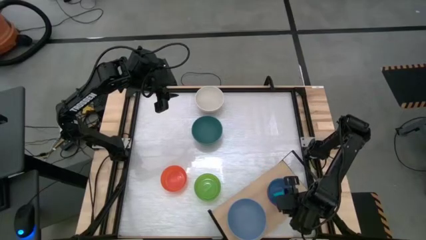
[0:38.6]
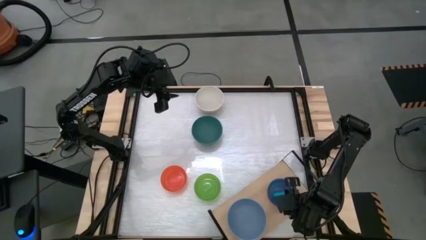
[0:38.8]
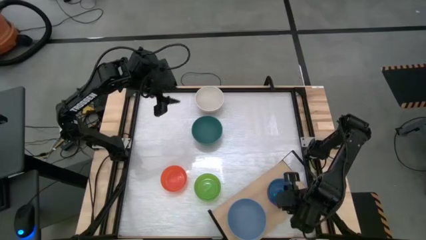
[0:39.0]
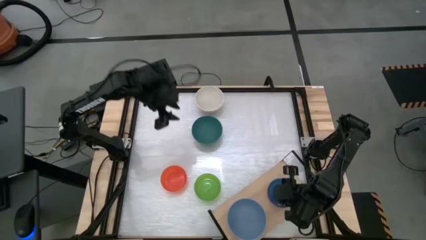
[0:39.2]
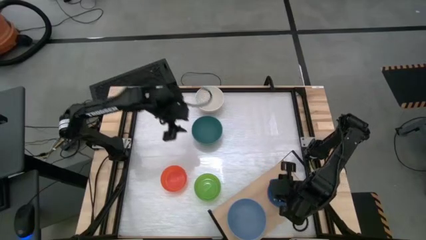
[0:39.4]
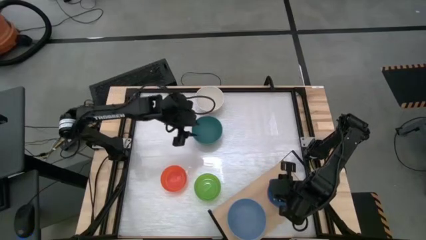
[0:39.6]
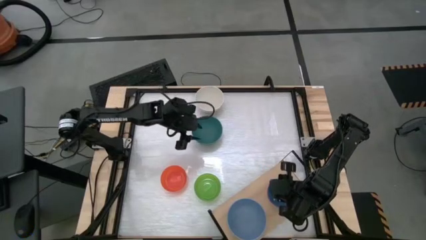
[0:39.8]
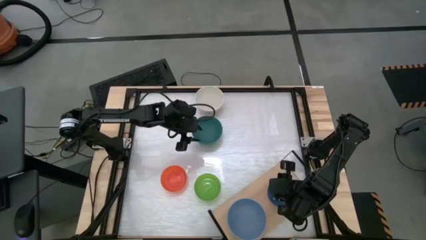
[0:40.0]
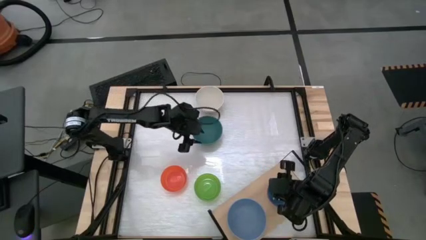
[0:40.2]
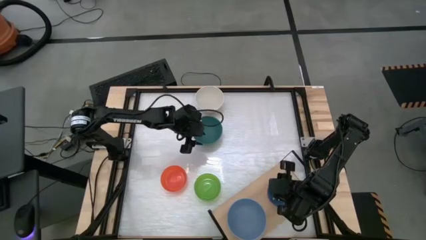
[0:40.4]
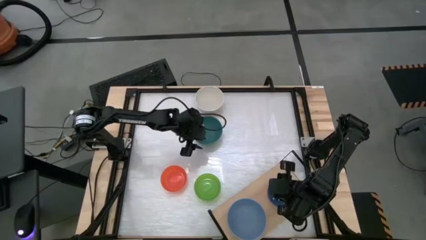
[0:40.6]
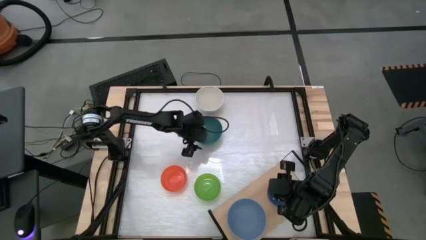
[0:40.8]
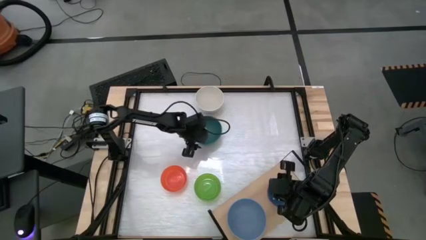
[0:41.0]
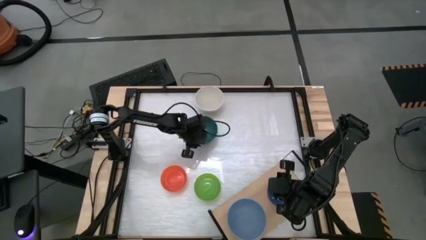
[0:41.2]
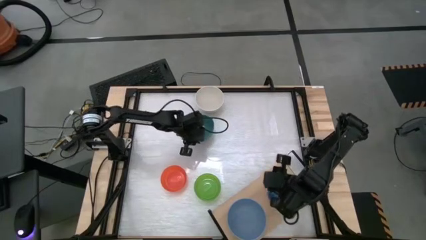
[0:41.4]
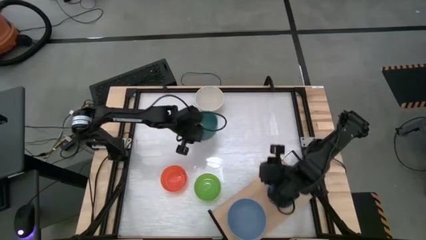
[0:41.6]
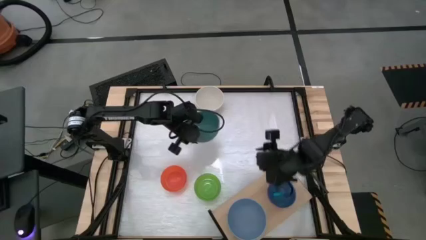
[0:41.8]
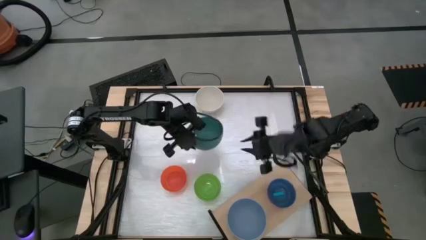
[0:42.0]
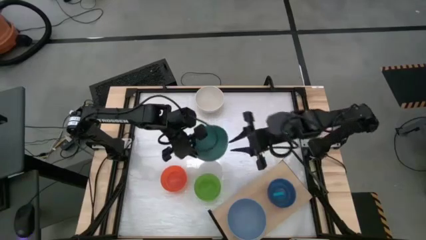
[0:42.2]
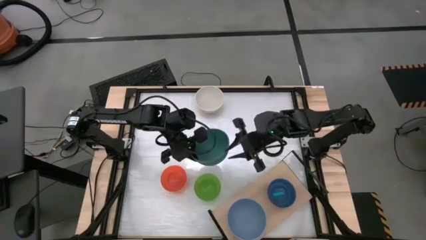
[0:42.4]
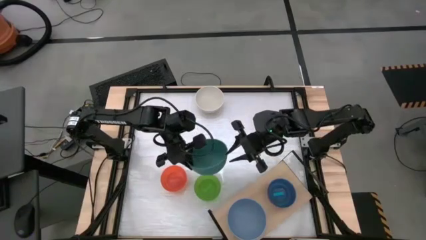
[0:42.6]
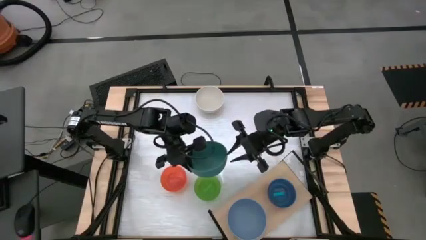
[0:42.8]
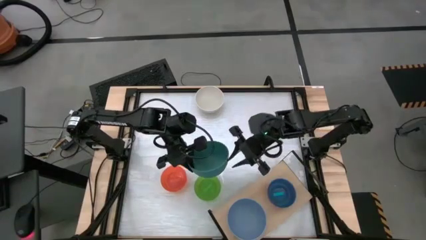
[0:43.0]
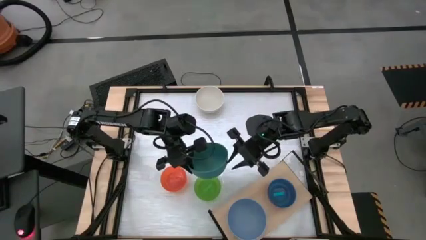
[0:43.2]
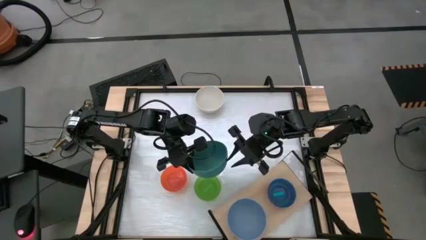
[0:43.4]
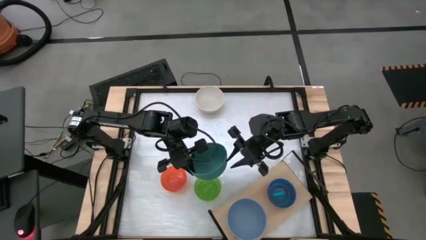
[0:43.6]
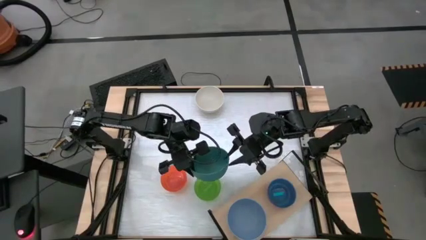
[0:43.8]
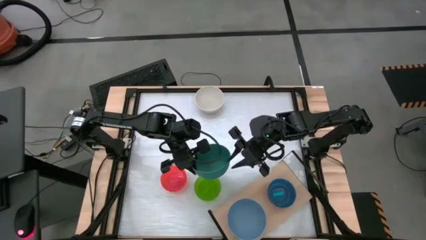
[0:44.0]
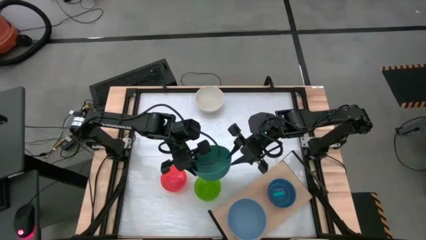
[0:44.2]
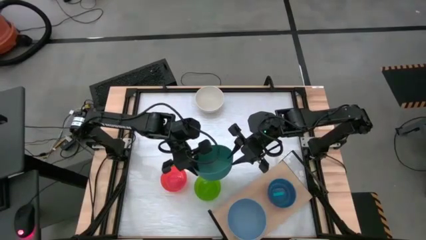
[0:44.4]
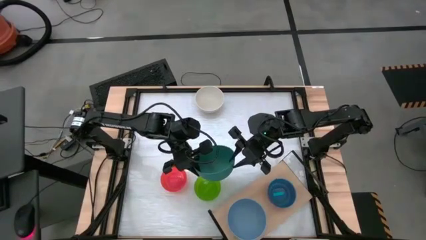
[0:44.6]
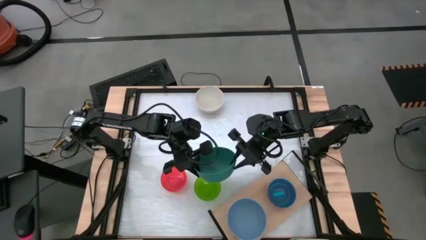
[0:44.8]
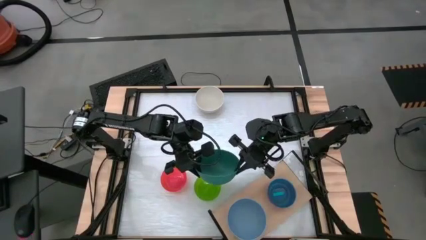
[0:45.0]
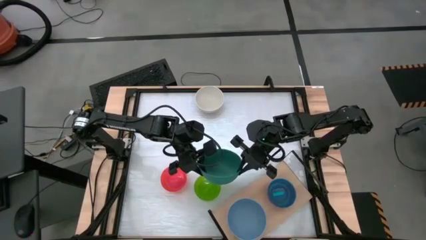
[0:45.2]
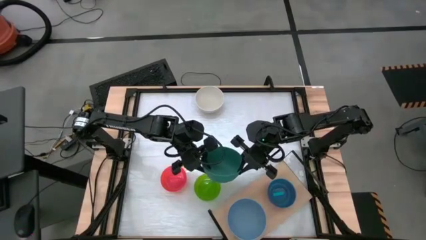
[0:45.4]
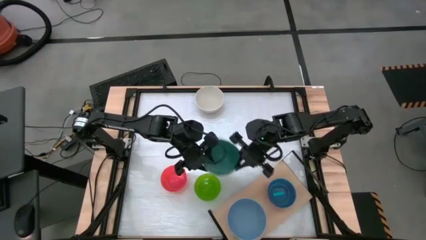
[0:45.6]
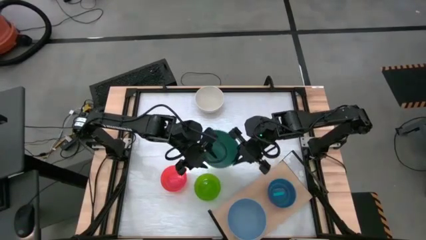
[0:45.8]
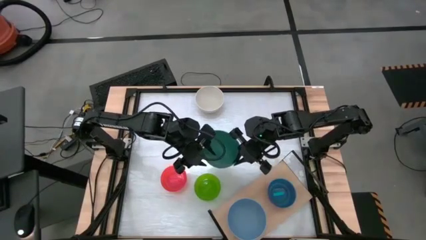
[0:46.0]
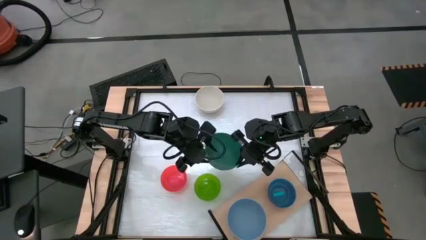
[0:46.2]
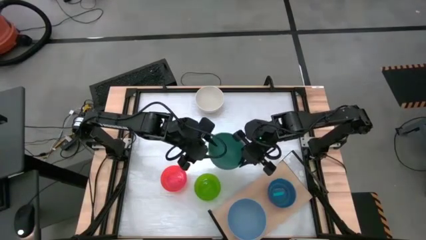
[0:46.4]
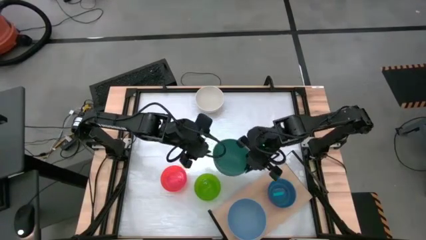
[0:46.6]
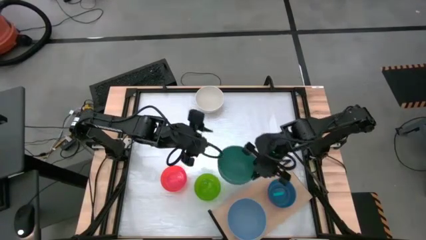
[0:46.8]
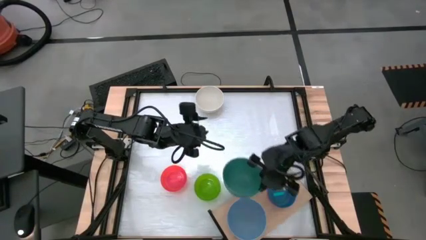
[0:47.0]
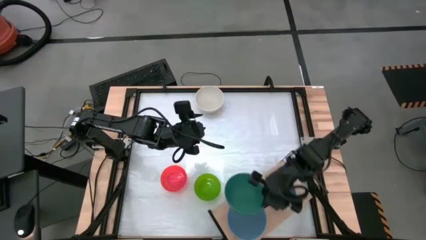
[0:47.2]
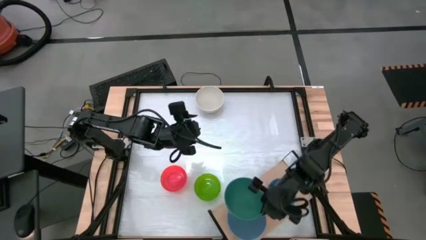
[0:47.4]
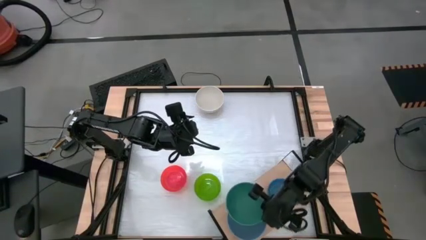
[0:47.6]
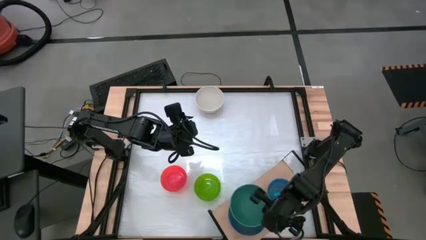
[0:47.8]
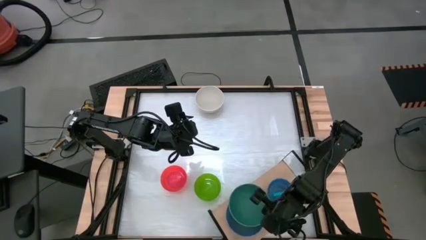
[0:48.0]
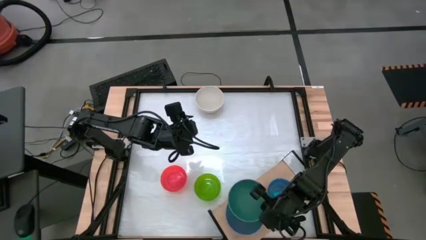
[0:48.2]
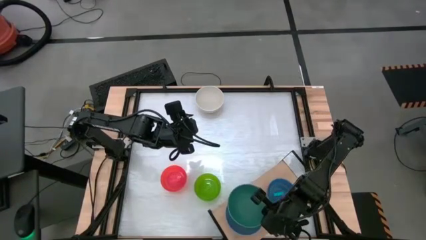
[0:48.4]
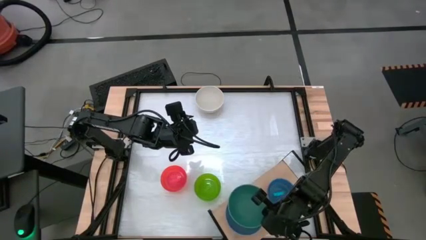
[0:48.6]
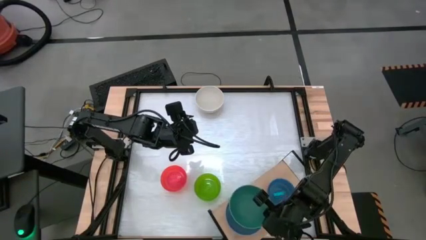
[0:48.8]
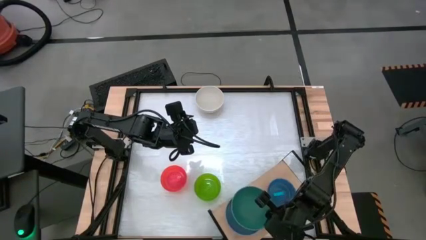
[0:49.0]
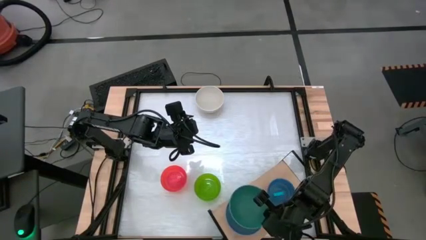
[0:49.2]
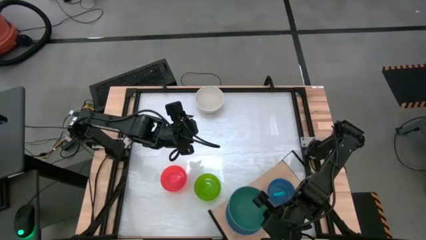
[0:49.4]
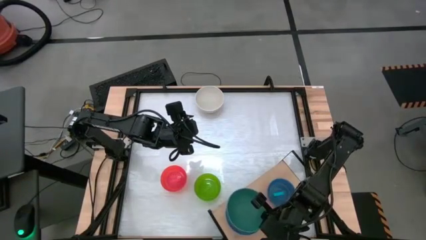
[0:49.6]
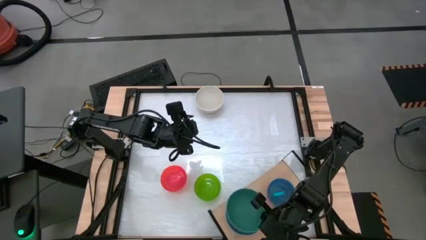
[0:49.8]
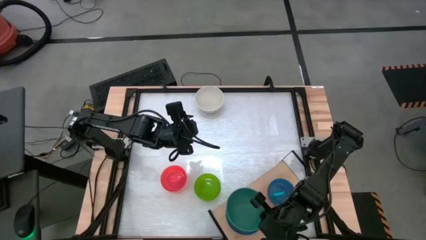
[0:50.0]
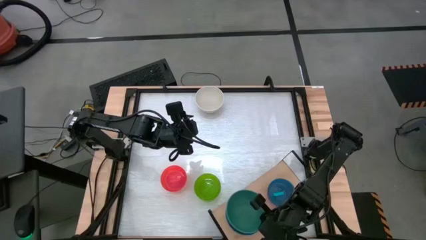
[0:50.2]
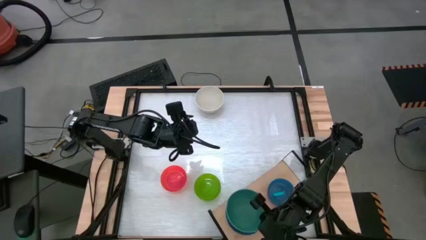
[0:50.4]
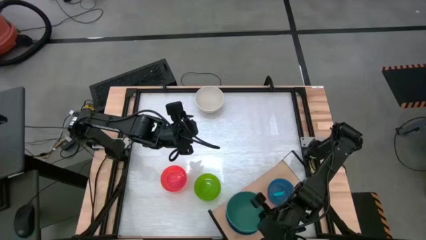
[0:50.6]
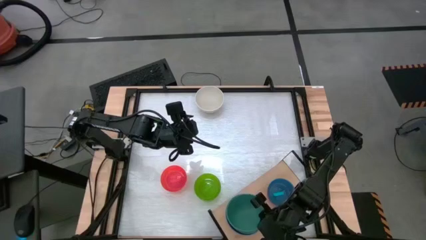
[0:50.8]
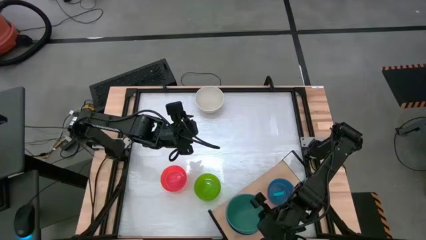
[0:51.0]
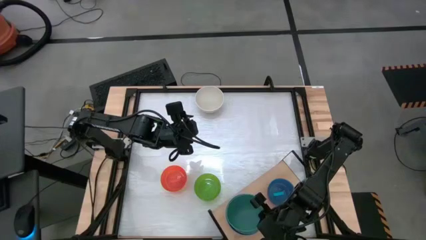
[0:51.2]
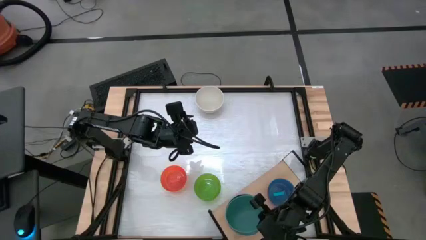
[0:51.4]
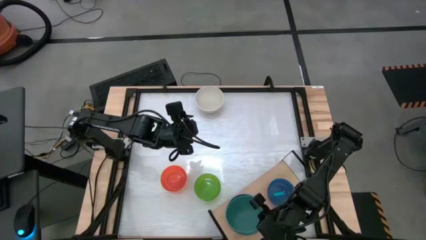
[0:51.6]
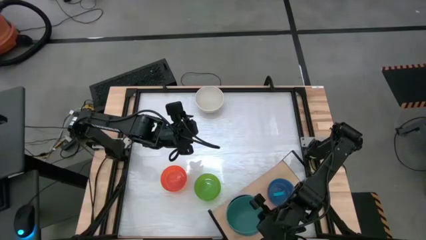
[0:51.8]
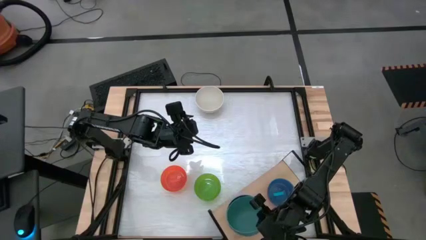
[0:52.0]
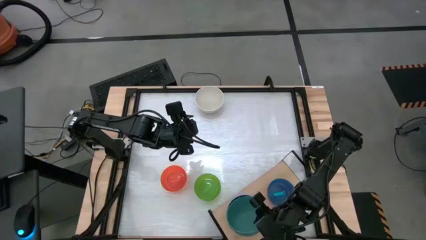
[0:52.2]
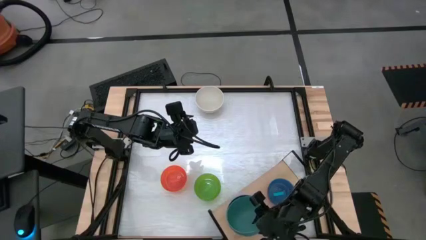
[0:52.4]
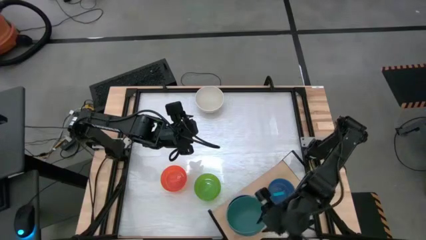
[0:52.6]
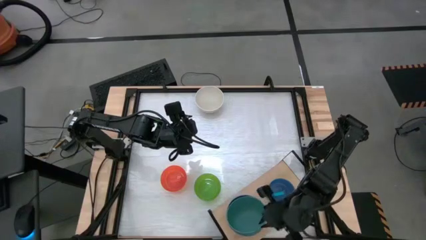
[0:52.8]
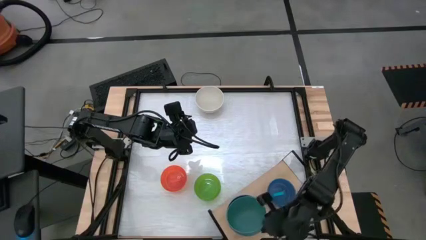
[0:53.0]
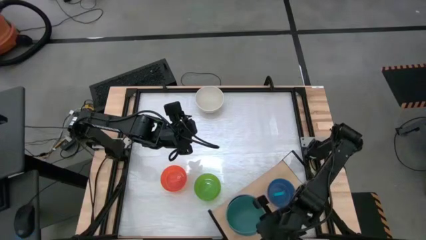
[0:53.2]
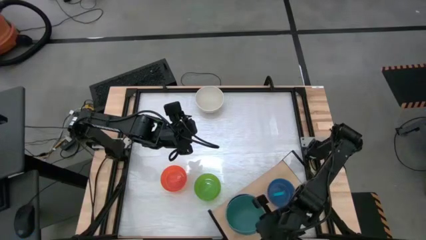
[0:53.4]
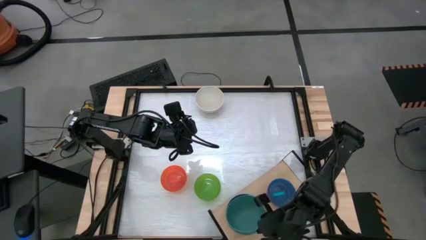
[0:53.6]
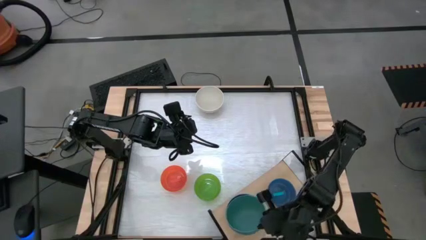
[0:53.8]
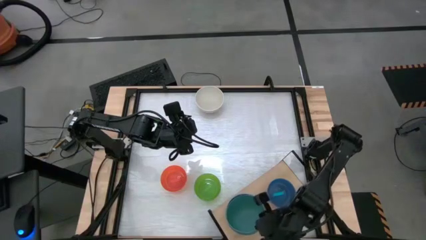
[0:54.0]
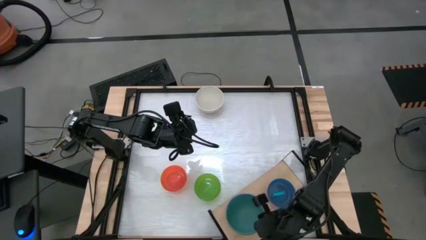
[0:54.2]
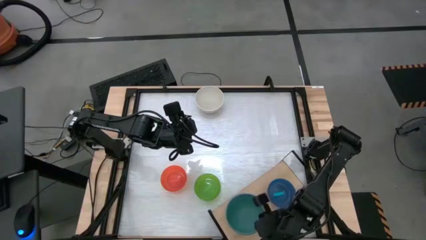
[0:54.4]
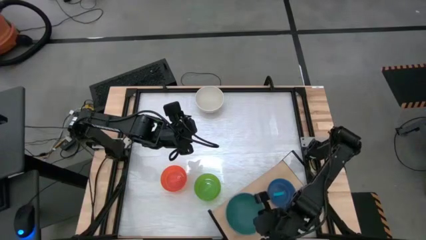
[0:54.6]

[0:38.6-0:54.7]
Task: Place and stack bowls onto a shelf
Stack the dark green bowl on top of the light blue bowl on the shelf
